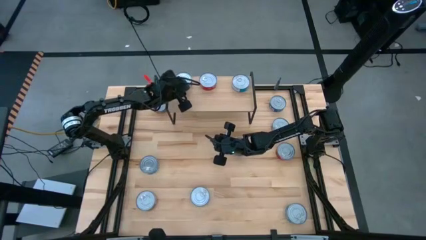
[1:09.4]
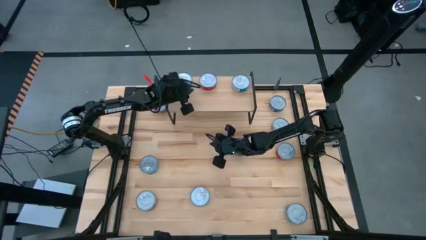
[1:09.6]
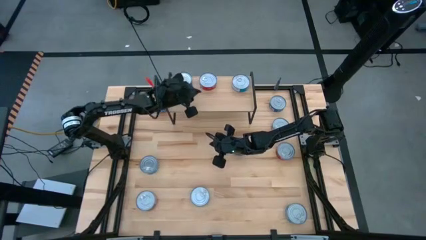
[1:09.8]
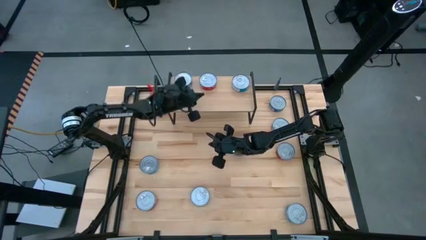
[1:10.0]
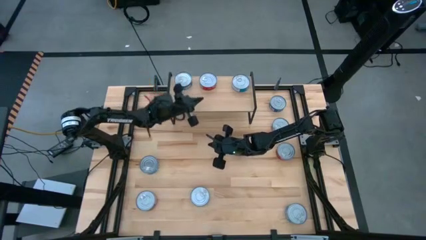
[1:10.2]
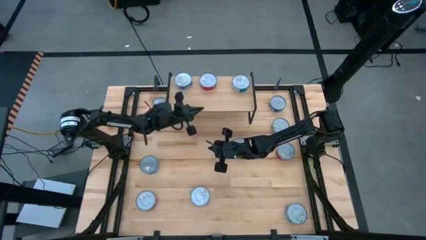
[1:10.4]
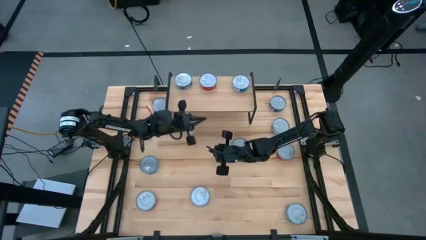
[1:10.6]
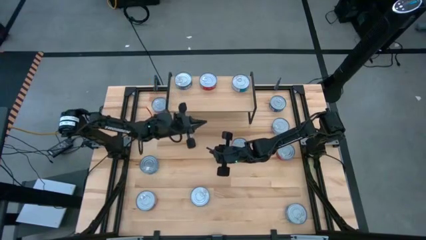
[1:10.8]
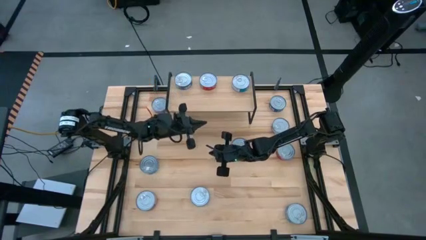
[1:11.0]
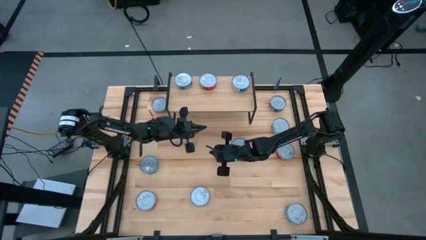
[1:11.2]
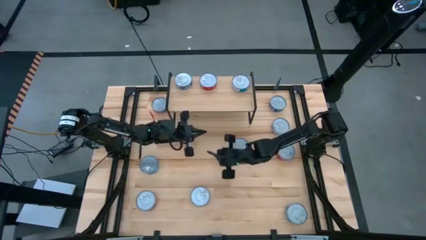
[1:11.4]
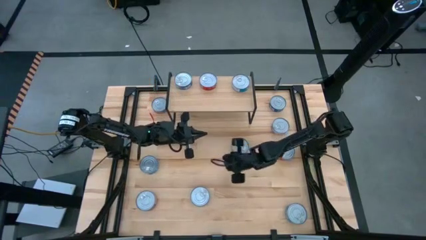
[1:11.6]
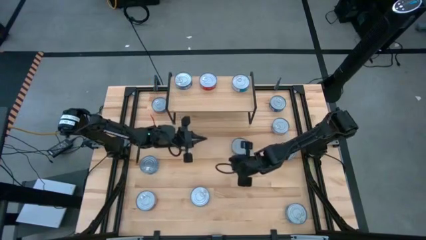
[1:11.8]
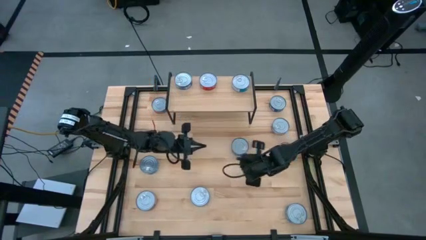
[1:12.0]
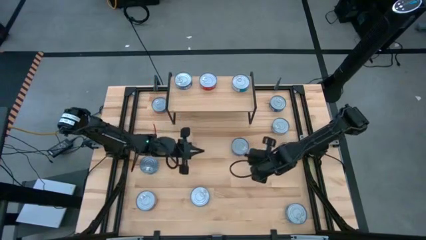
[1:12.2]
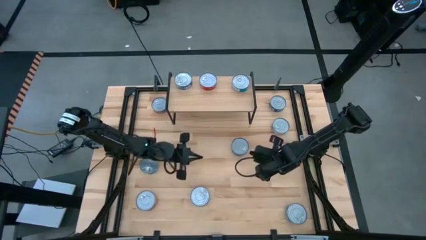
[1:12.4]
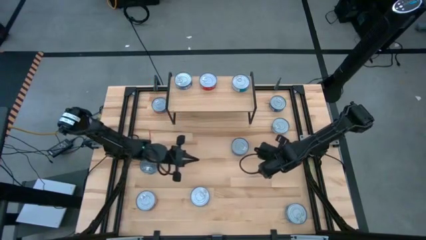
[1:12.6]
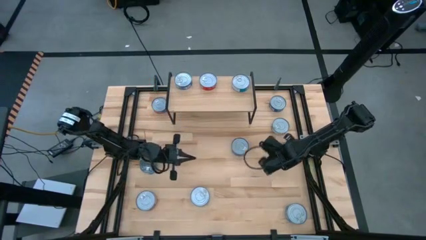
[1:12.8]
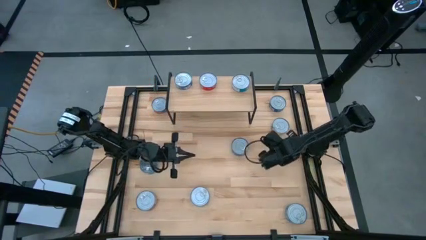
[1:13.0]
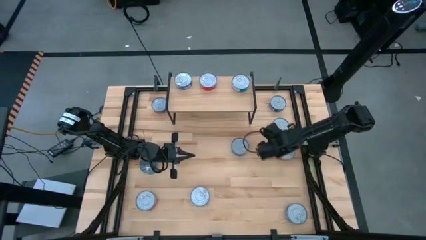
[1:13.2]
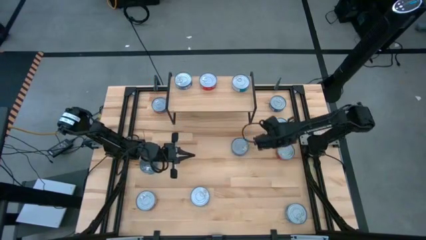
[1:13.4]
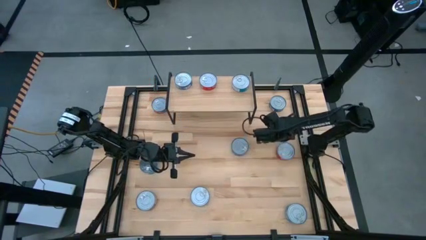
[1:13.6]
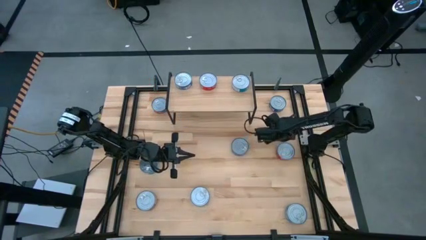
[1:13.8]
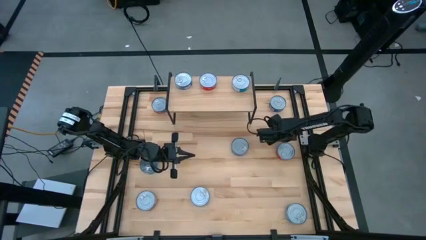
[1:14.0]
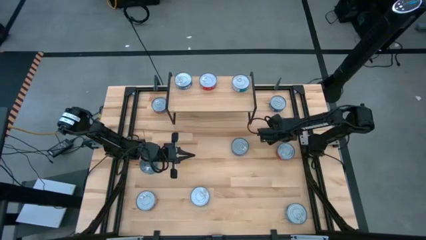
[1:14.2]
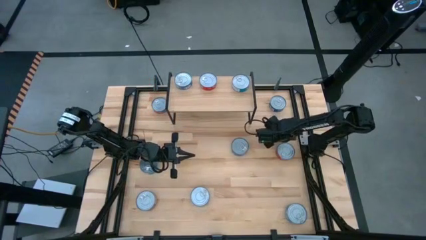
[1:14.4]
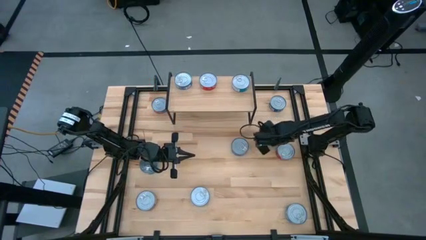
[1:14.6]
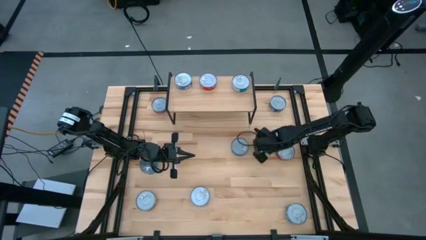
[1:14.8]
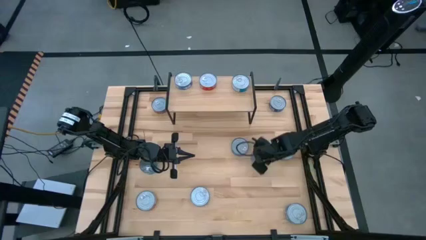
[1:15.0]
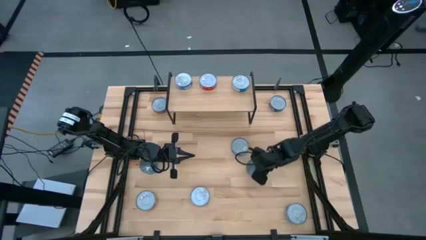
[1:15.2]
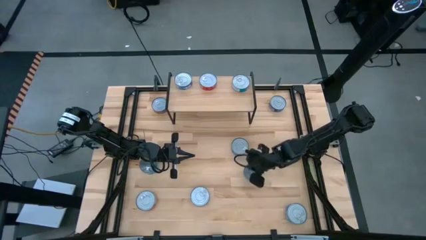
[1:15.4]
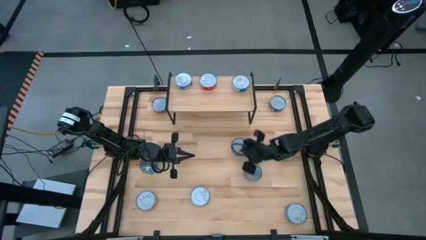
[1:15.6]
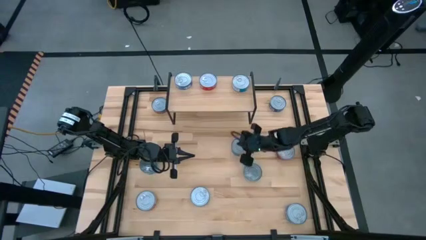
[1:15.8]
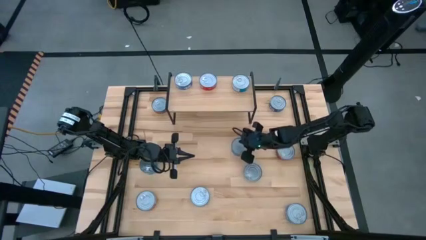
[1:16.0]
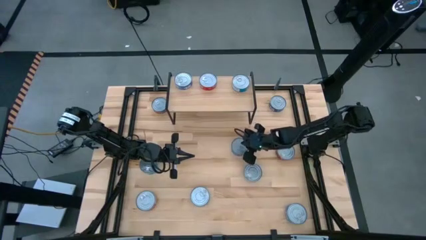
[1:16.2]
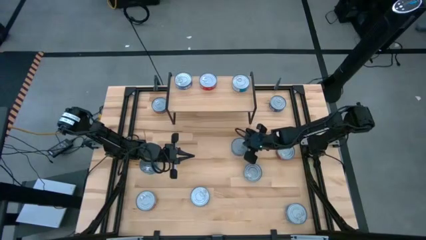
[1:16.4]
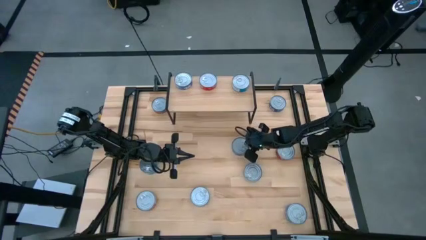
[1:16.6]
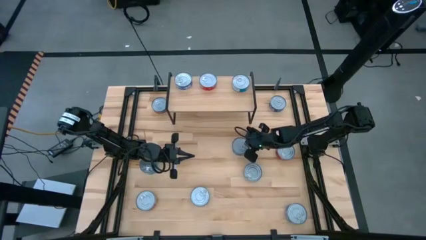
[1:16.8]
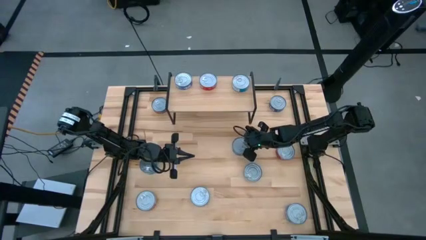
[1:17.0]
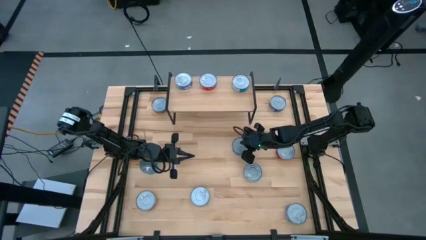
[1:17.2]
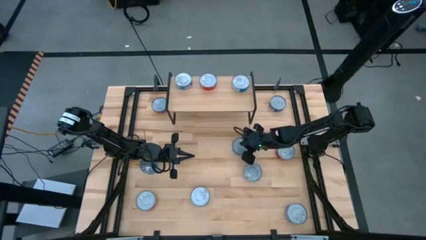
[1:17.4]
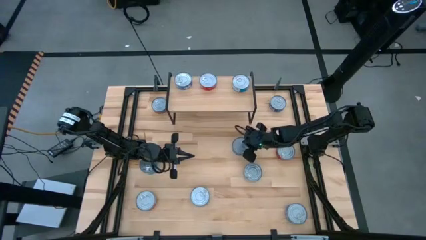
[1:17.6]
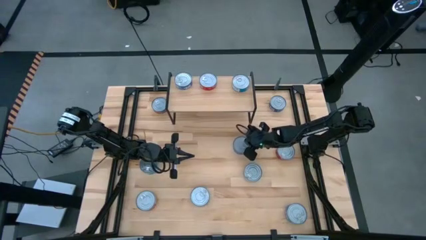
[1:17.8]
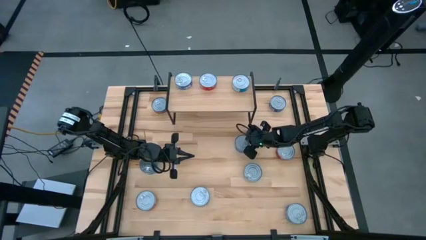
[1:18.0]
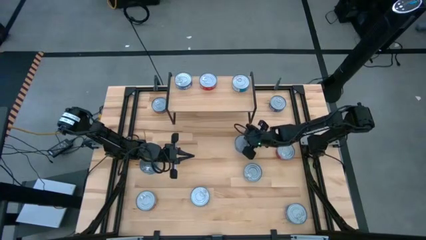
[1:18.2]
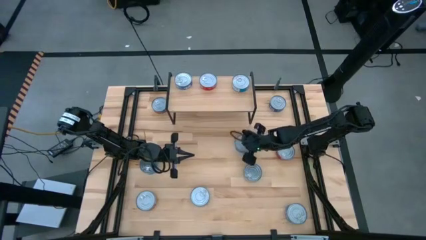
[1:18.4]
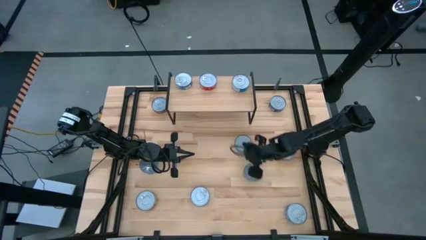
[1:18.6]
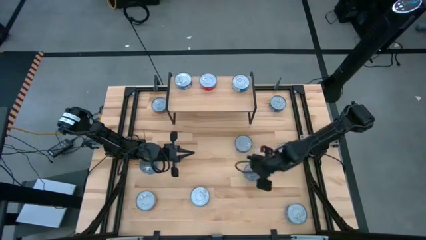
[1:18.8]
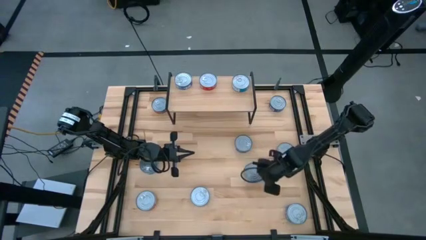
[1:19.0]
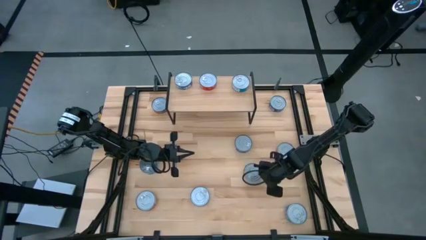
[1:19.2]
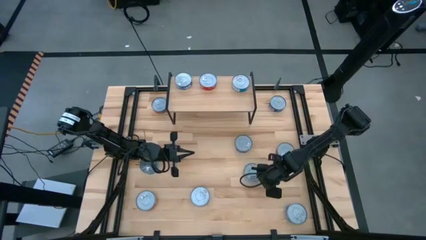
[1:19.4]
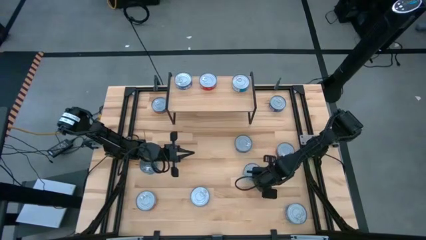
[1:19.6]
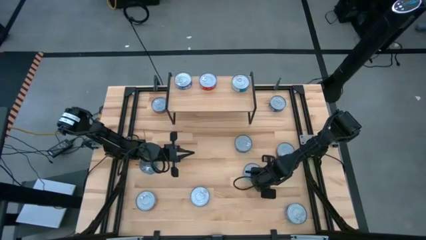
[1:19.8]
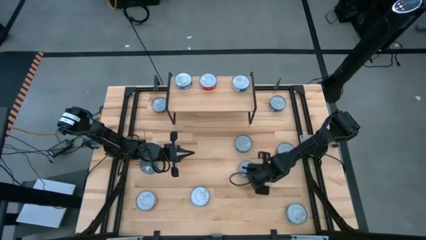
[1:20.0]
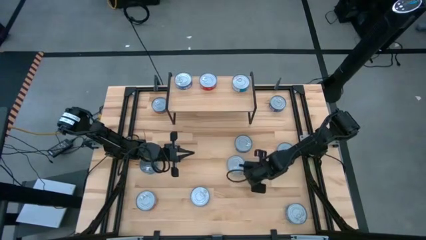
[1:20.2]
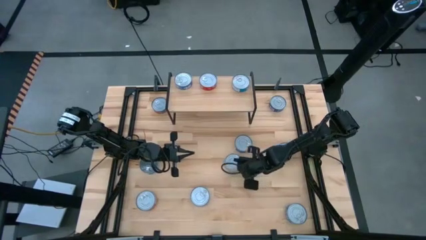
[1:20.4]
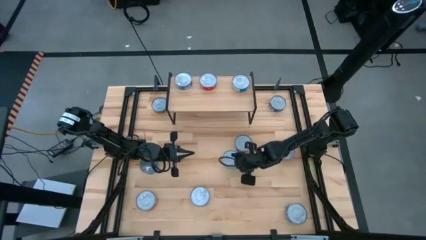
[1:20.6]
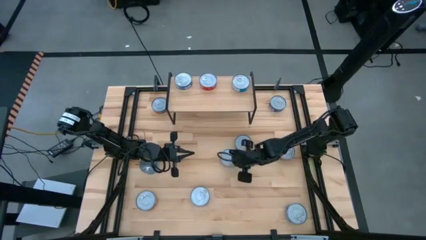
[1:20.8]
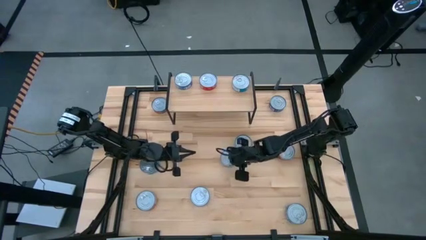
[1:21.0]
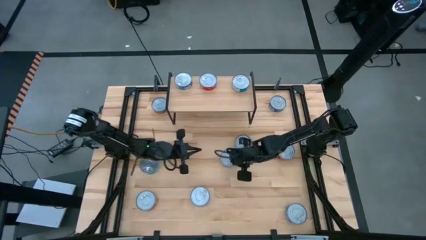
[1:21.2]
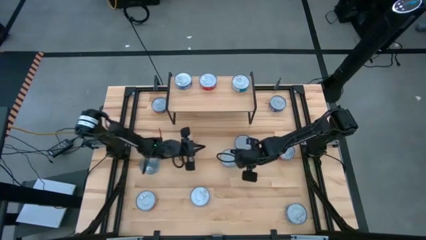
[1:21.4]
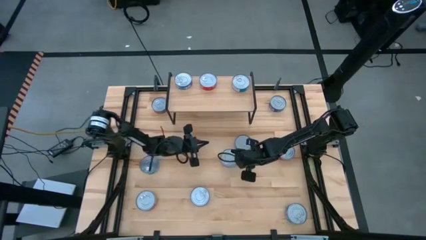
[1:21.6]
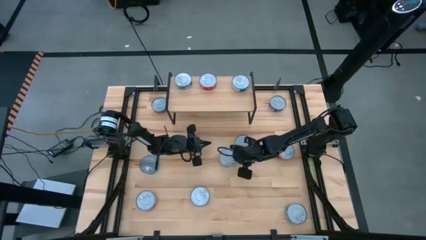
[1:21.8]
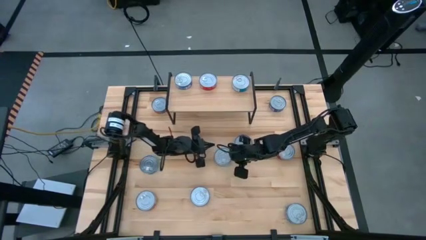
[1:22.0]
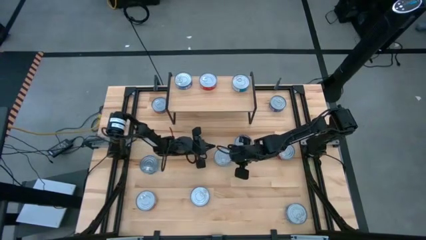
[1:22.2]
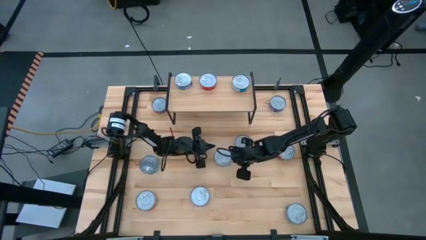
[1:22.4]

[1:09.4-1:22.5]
Task: Stack canned seafood by type on shelf
Stack the yellow blue tuna can on top of the yellow blue tuna can on the shelf
